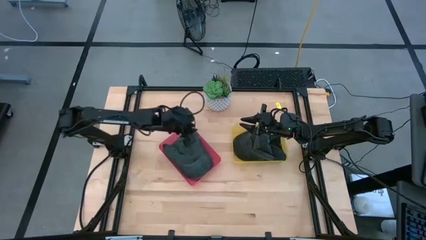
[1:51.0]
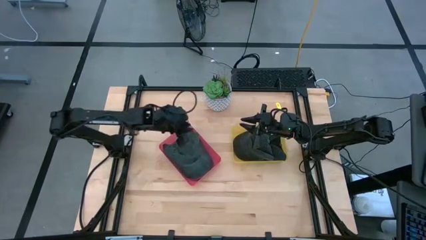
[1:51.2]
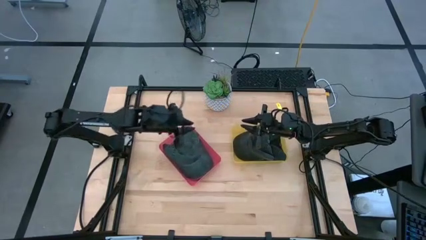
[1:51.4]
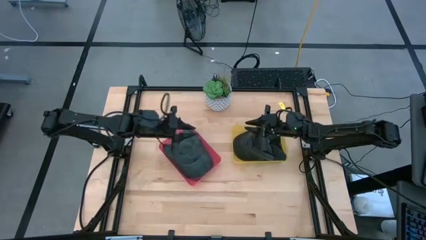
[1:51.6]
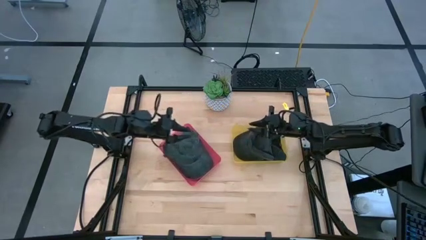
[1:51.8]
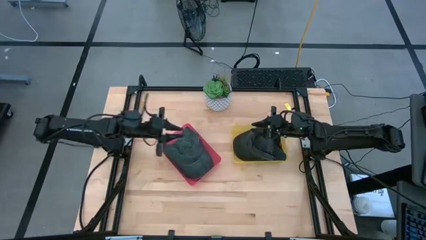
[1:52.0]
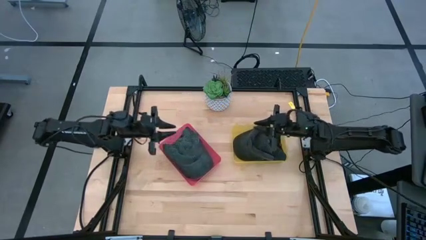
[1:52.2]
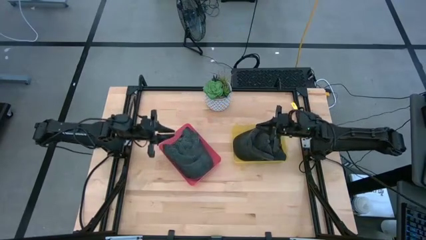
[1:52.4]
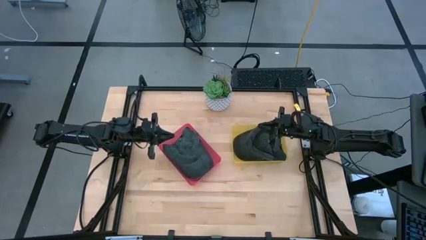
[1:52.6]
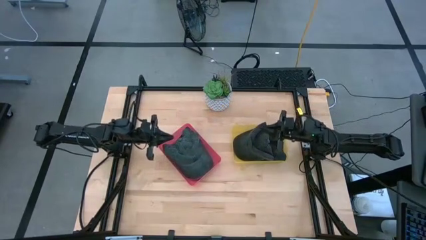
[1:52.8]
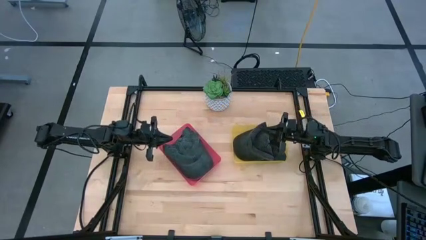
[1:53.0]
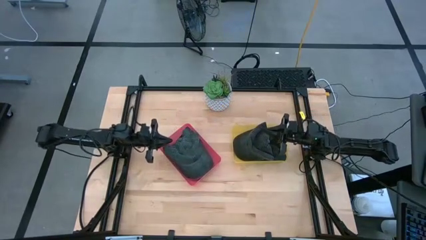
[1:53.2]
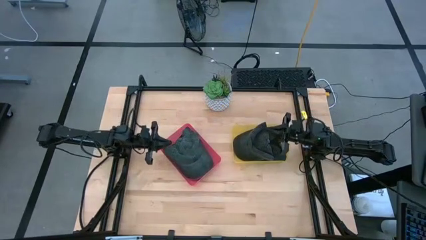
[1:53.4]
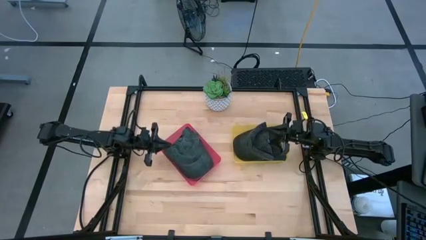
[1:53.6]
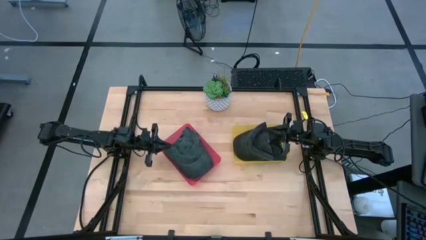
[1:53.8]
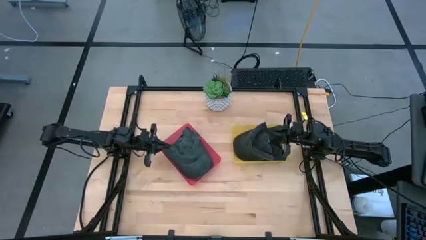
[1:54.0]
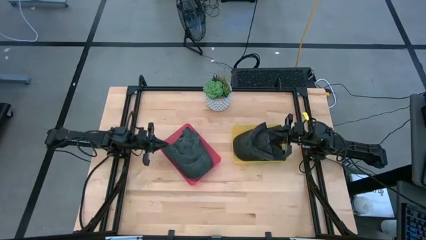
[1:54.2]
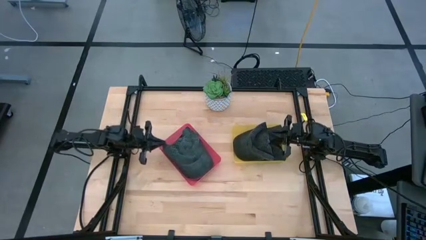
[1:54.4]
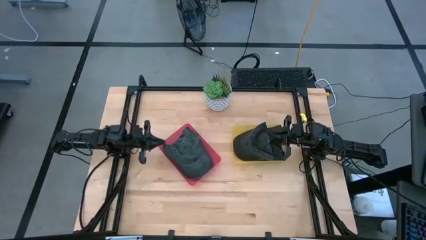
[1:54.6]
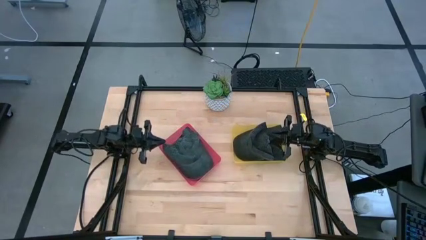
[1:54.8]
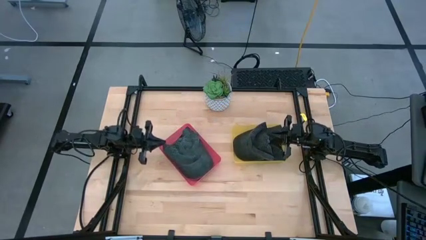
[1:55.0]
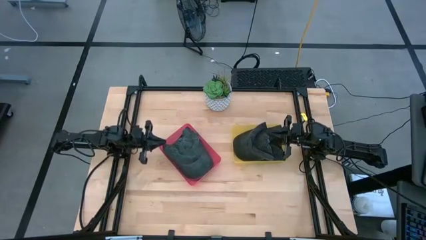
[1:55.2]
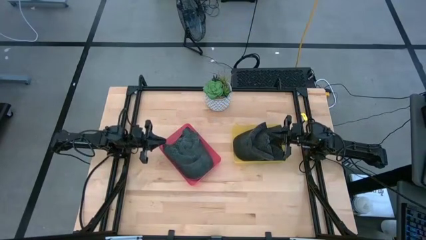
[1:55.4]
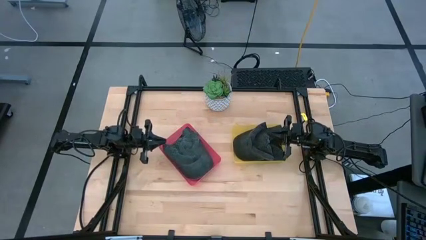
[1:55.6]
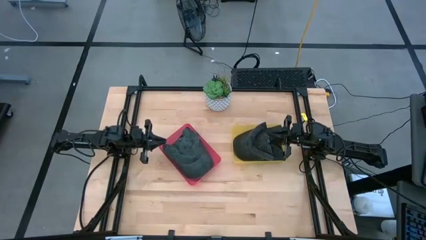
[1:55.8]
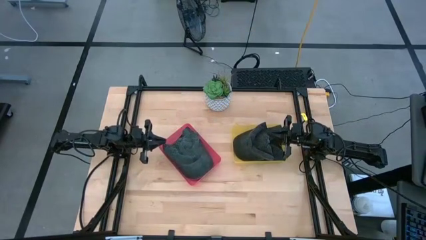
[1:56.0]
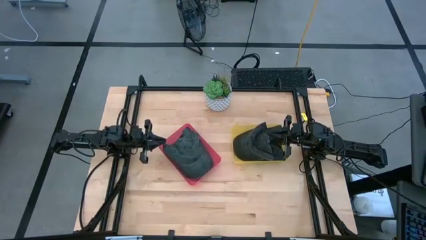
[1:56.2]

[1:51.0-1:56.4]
Task: Pick & Place hat
Return to Home Position

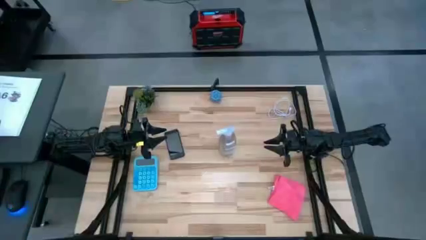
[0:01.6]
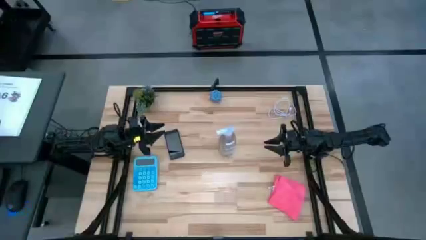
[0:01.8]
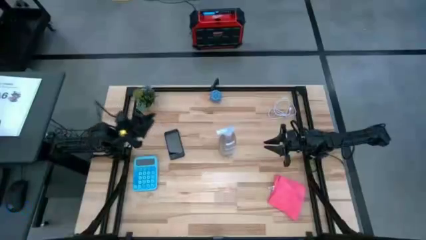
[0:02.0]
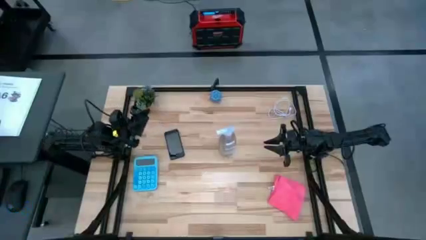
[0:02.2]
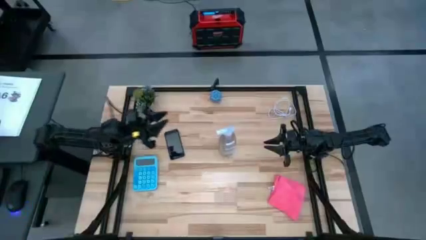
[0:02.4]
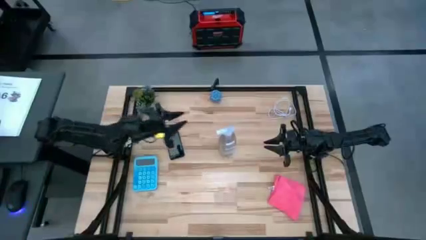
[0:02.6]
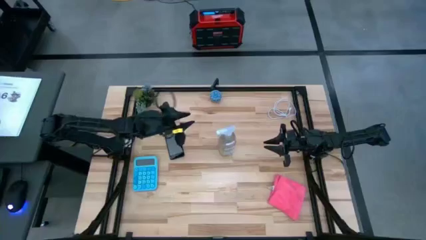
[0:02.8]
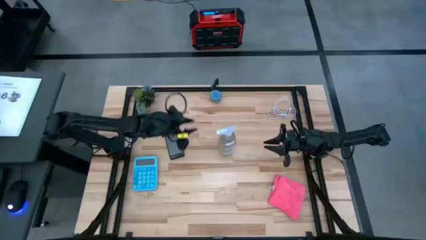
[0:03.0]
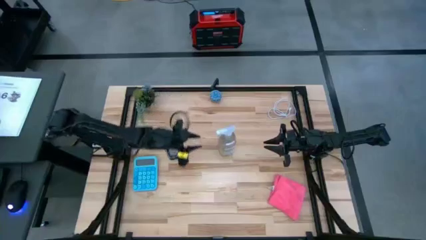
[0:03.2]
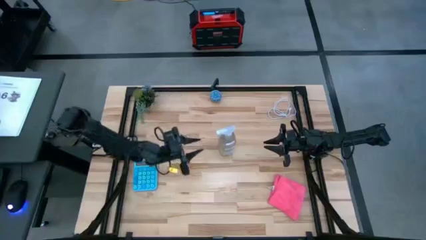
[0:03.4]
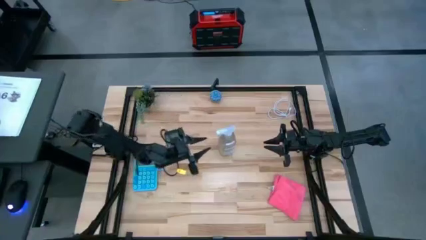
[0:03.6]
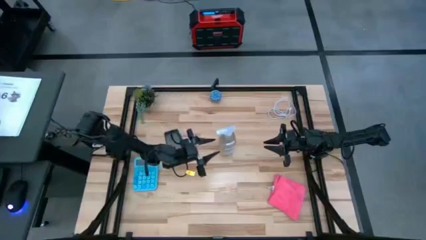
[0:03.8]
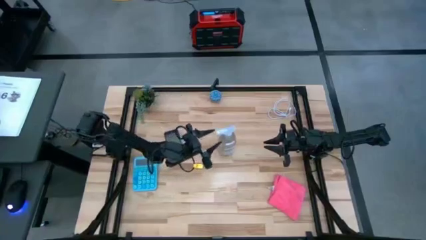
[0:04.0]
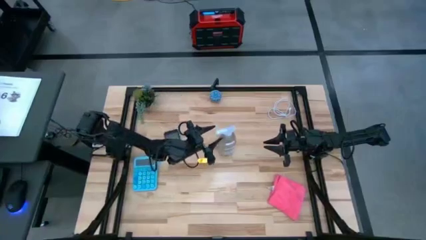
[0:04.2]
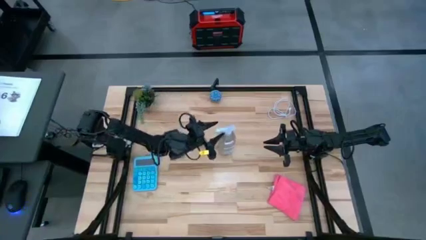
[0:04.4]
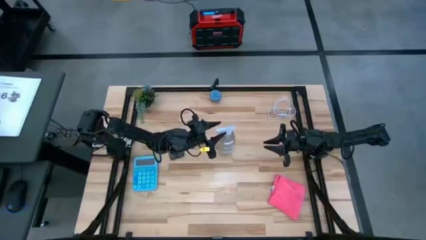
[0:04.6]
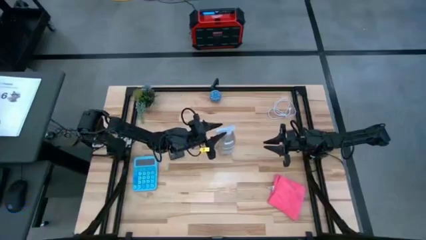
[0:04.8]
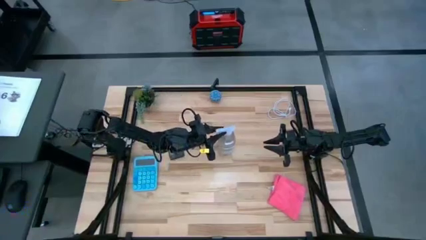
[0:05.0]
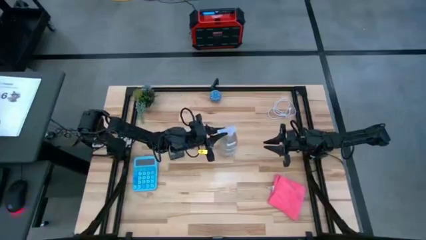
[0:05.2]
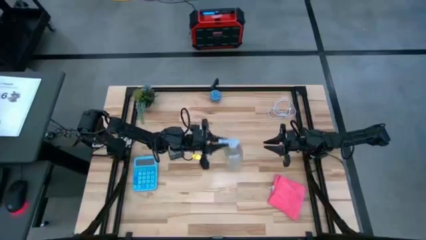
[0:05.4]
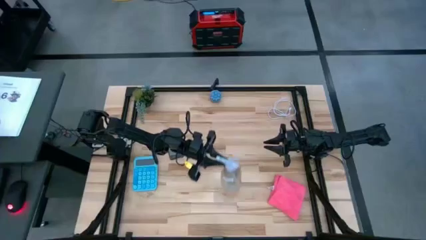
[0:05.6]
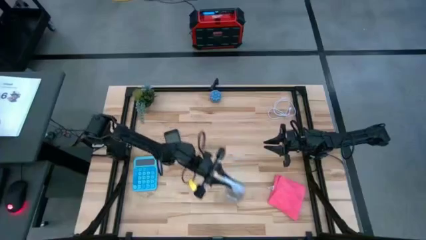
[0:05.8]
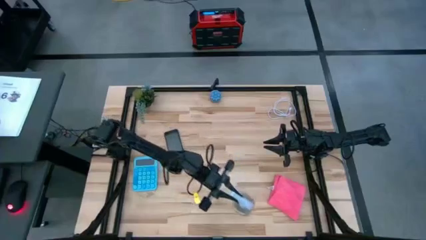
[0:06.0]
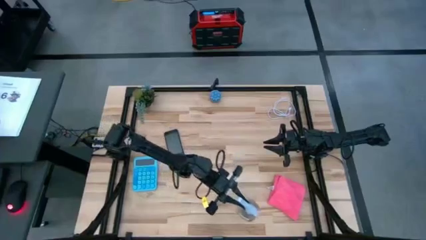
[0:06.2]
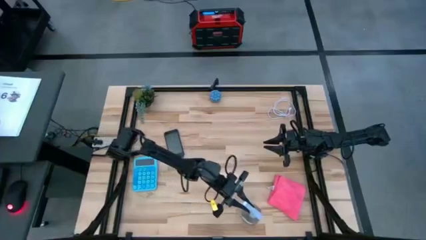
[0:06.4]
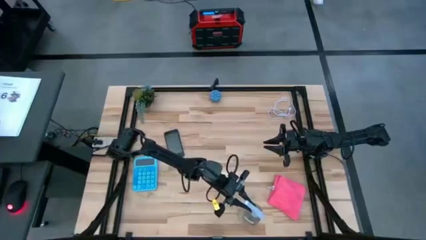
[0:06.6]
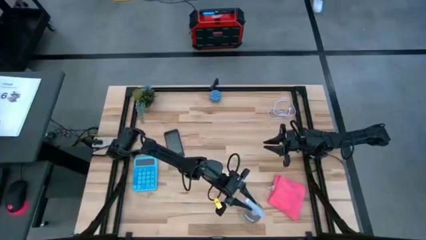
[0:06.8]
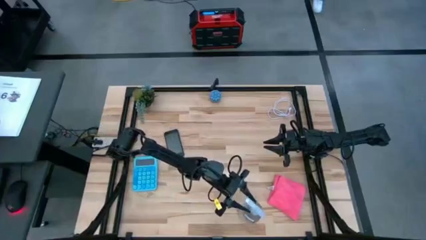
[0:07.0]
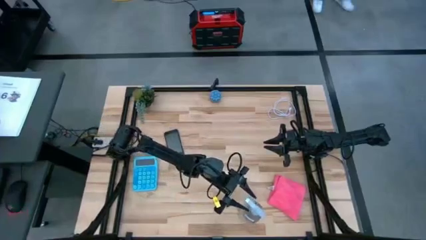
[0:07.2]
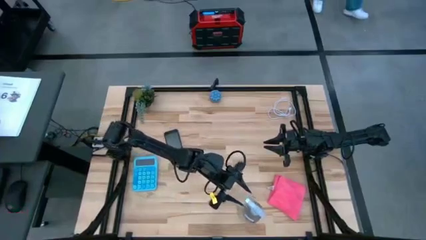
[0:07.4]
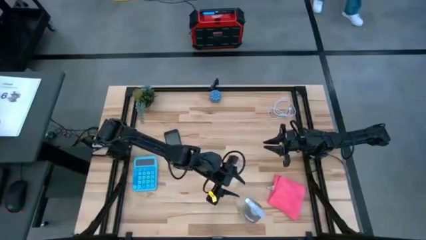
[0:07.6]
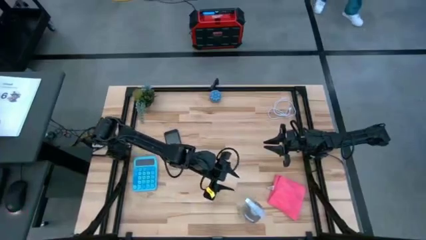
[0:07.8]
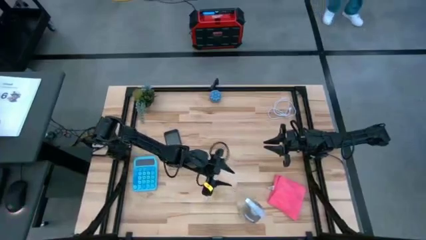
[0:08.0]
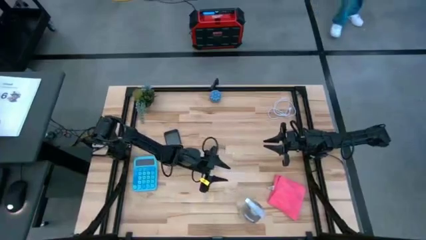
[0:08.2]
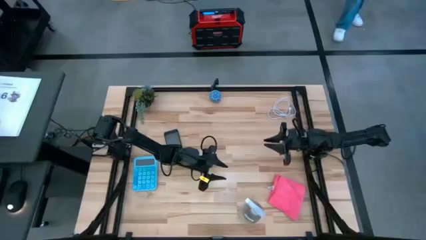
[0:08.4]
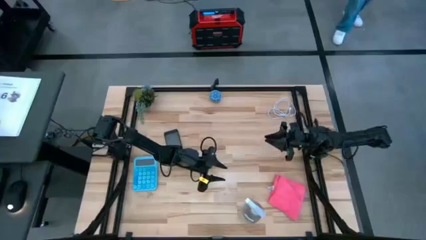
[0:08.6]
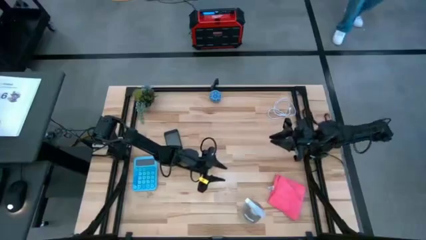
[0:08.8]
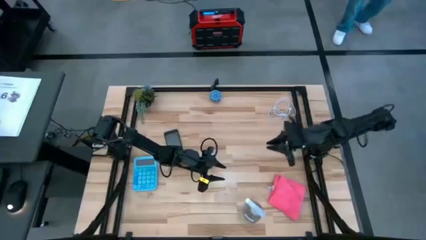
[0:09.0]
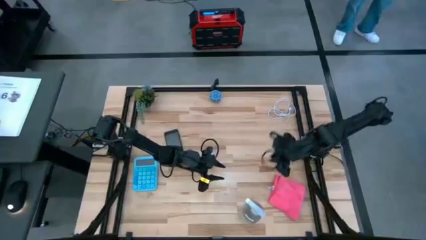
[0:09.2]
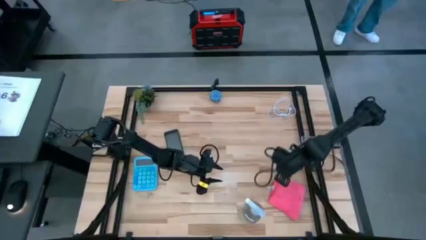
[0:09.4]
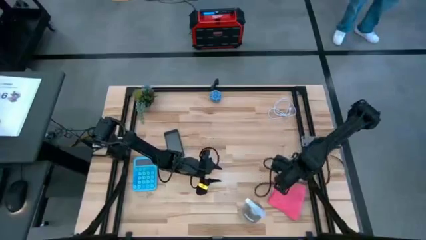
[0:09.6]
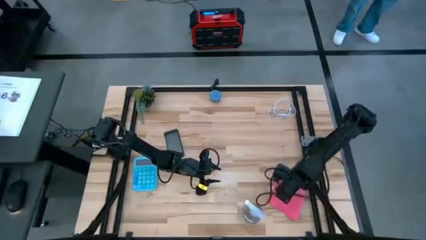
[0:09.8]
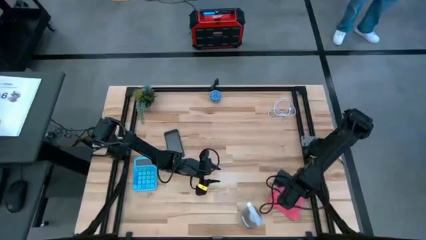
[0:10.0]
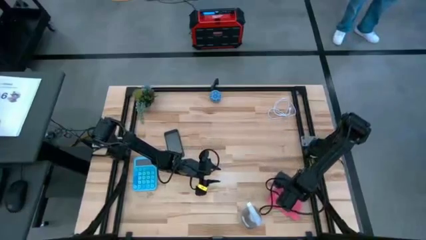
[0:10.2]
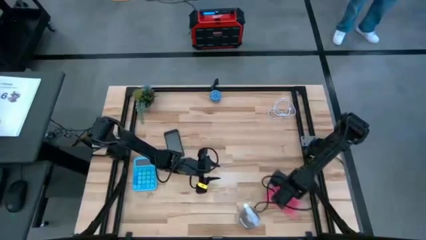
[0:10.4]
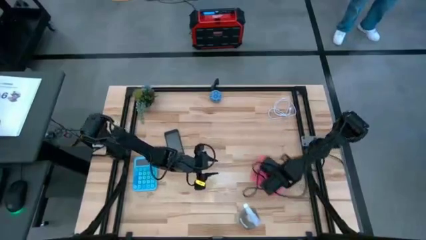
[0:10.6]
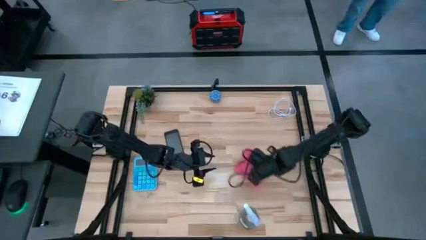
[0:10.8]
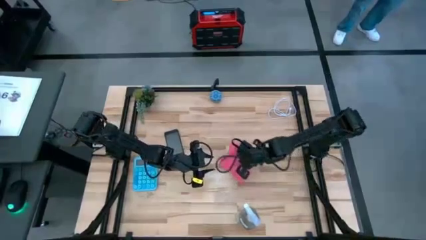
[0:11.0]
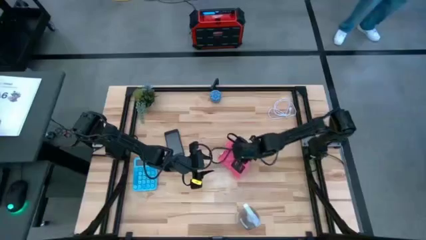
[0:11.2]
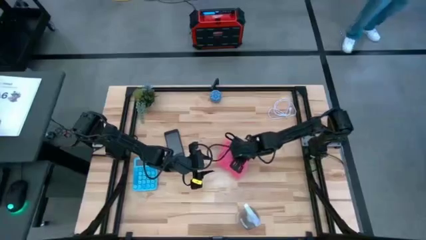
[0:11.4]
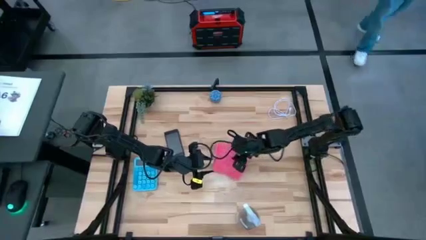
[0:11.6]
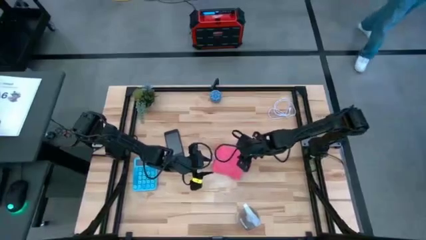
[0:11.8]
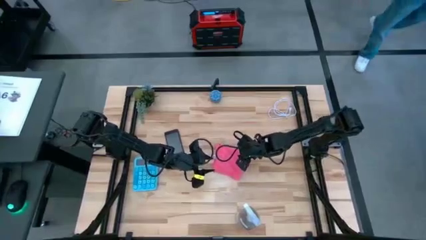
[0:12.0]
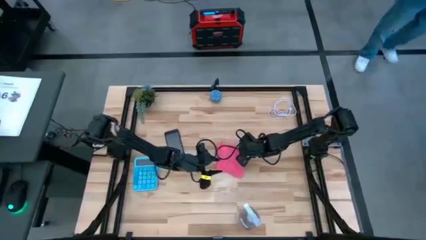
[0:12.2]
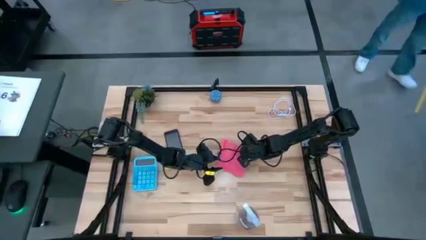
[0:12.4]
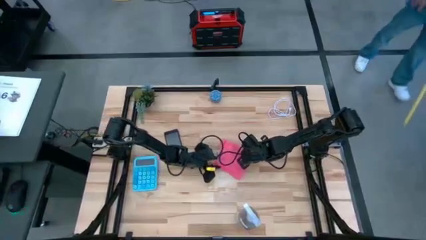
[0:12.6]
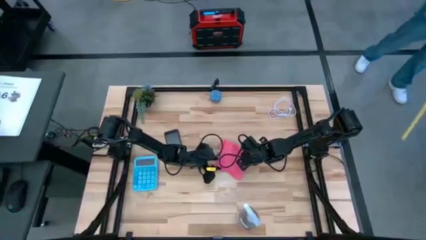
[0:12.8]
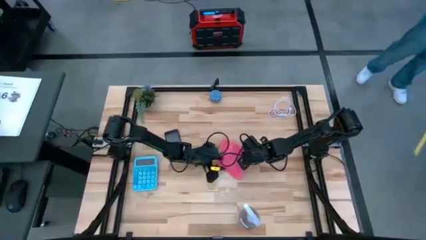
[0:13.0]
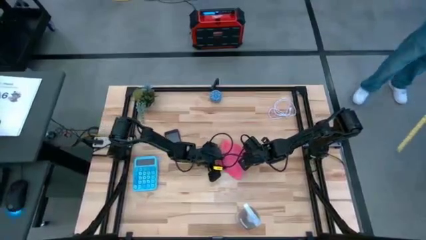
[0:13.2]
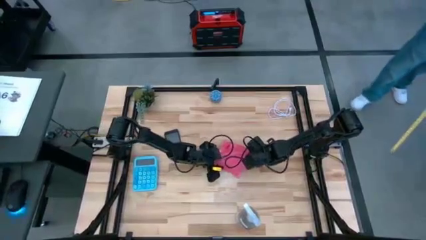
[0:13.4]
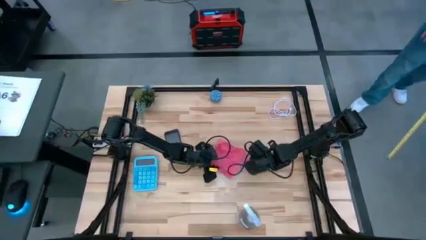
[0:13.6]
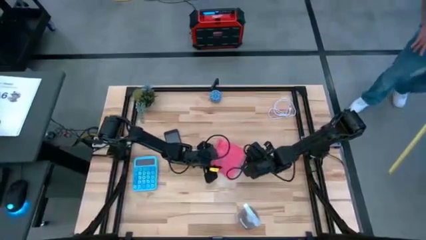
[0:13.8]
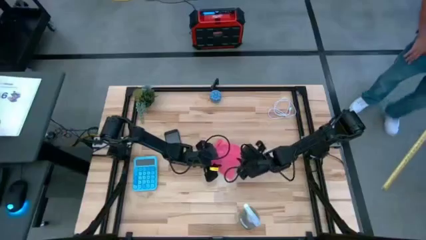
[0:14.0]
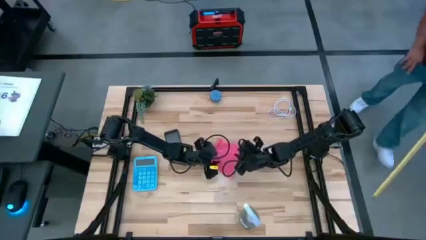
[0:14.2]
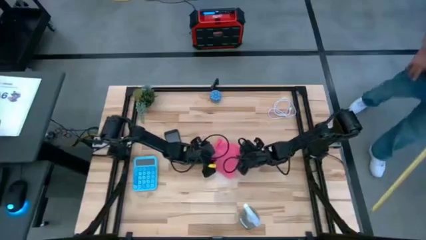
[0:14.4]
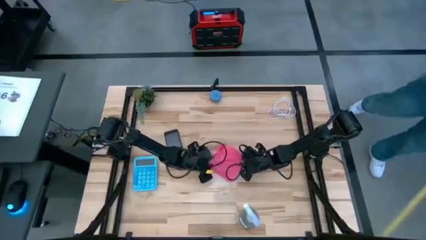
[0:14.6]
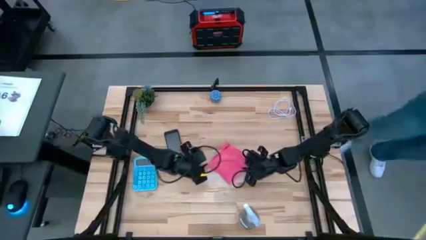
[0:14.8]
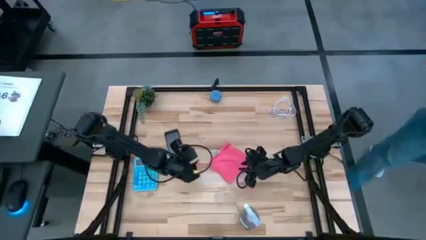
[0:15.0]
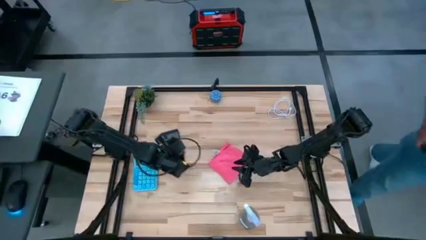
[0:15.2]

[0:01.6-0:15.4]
Task: Apply microfiber cloth
Spray the black cellphone with the transparent spray bottle
